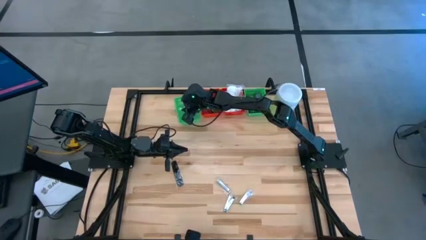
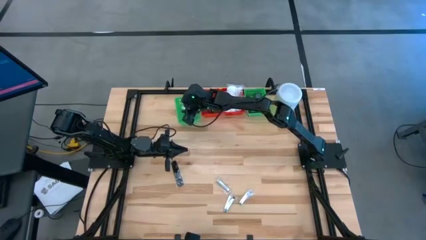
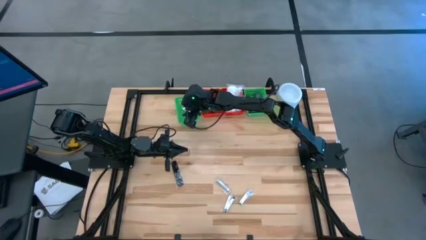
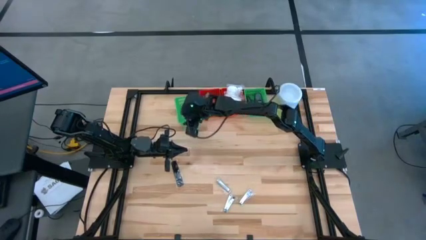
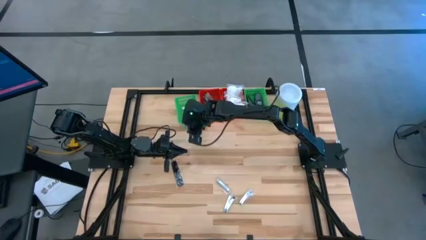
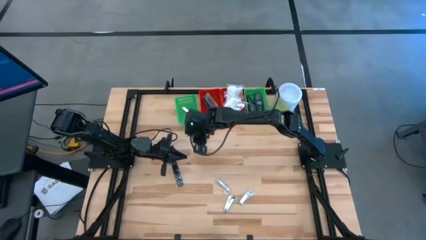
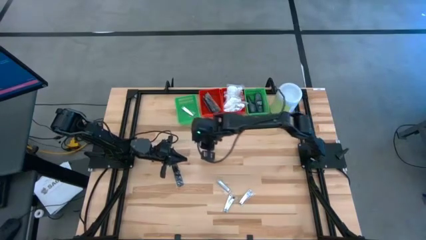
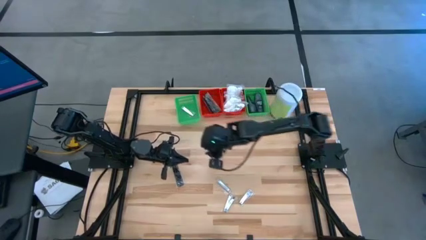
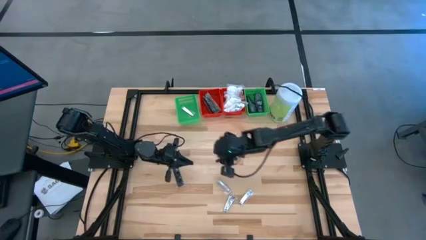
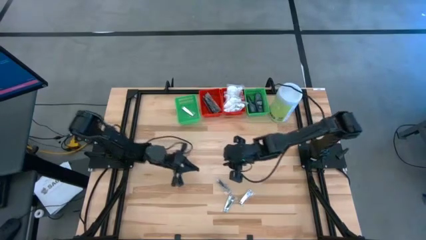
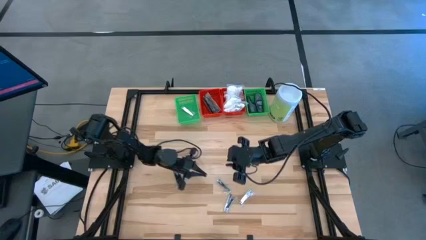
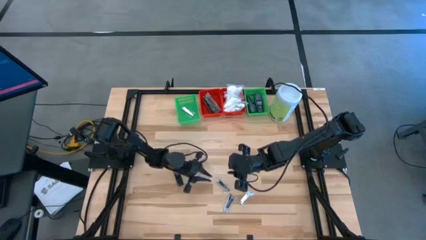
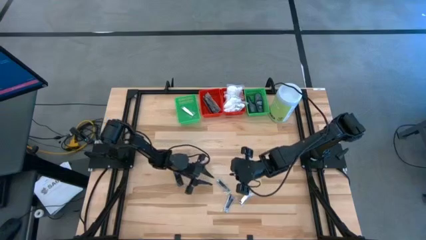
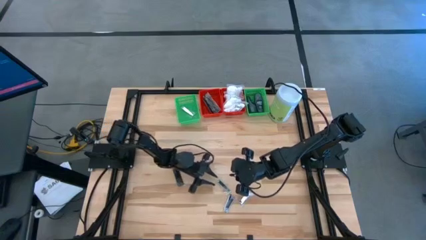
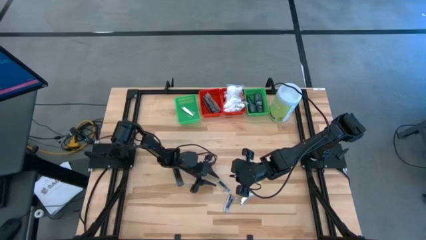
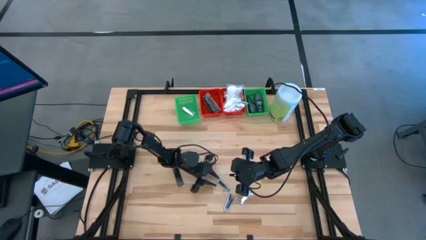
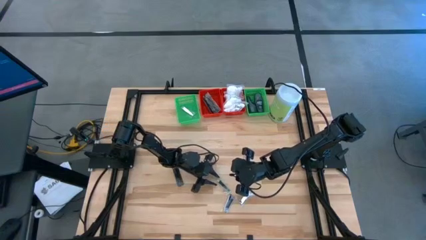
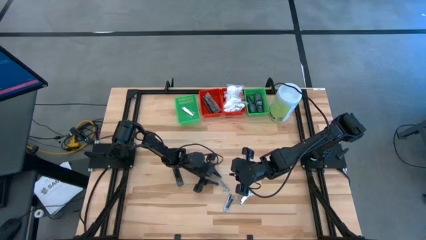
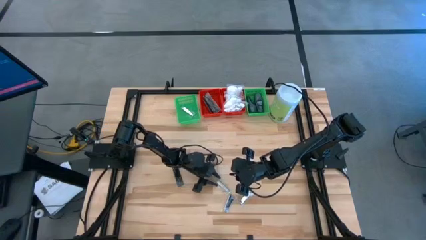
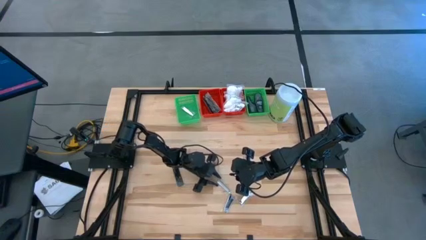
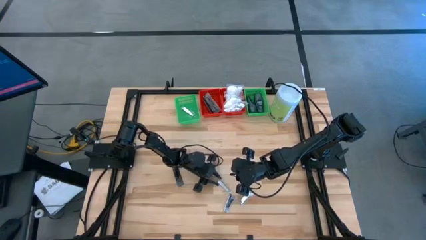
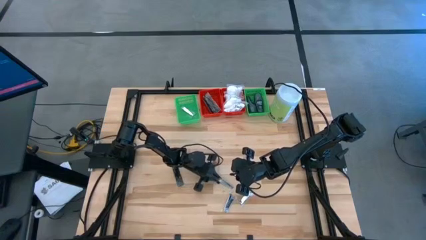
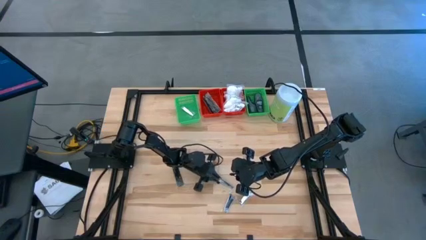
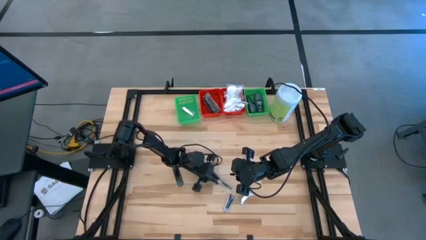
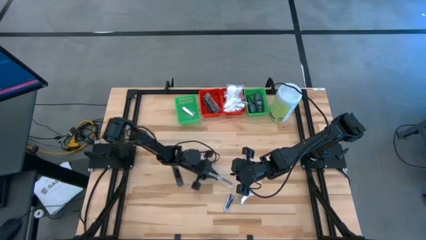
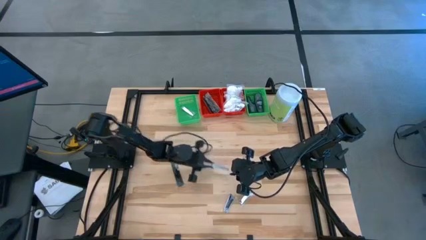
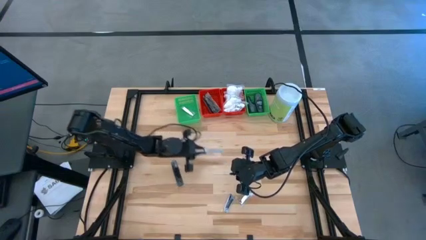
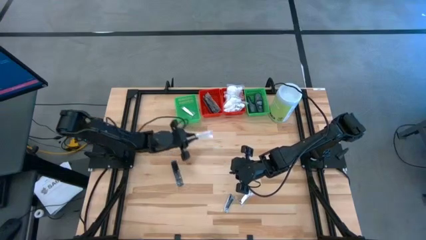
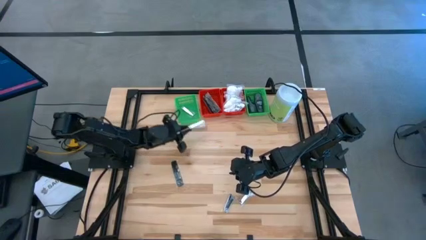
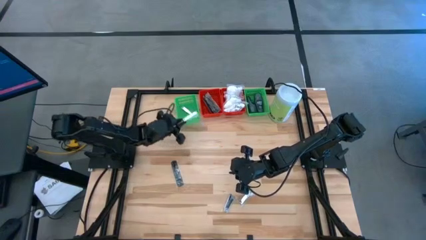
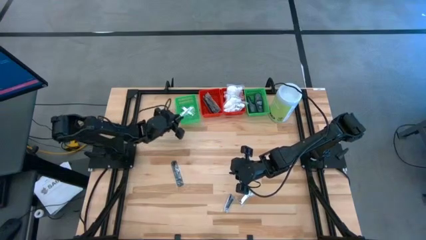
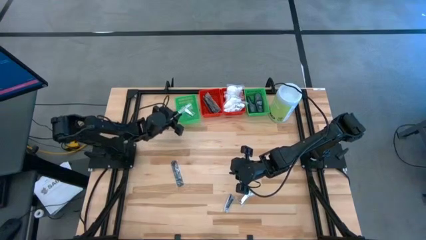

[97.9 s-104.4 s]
Task: Pick & Place Travel size toiletries
Put the silver nail cutter into the left green bin

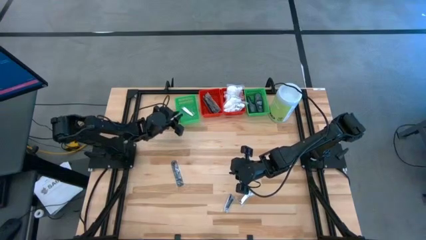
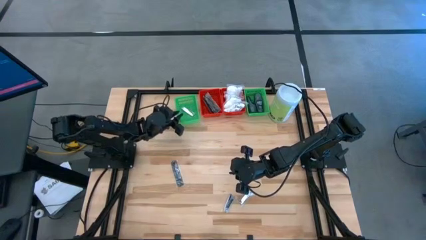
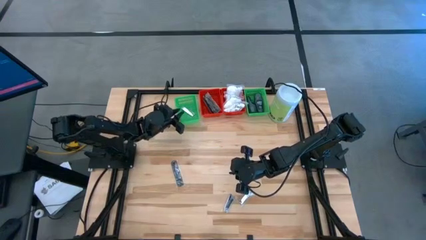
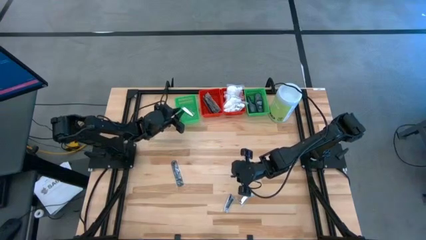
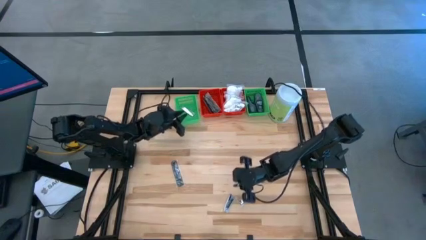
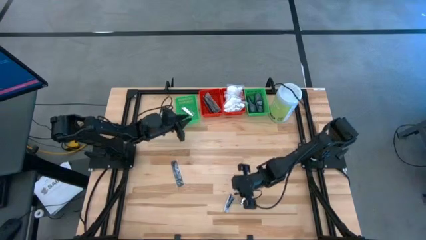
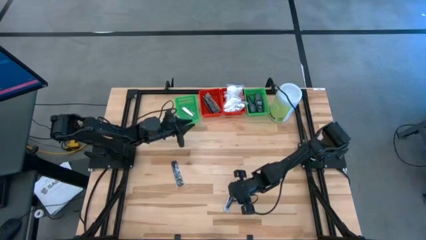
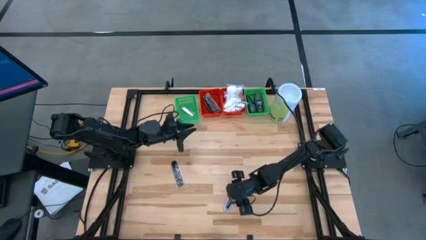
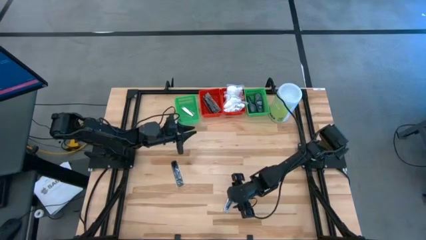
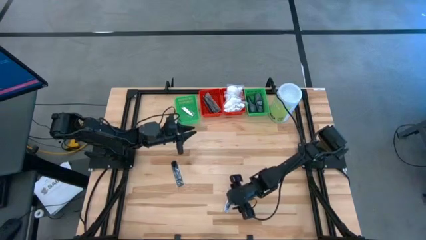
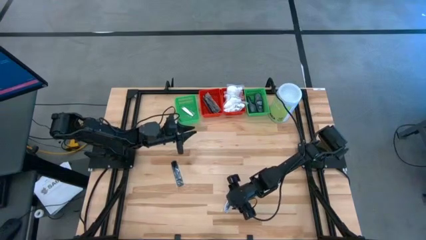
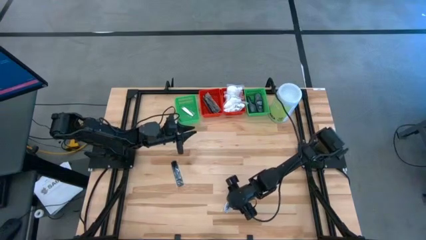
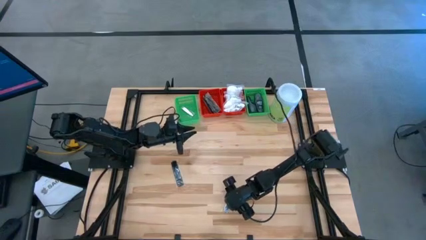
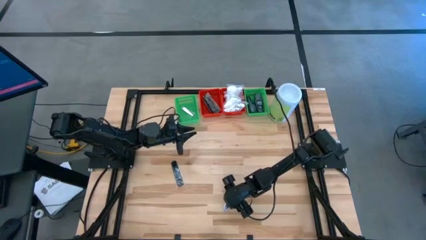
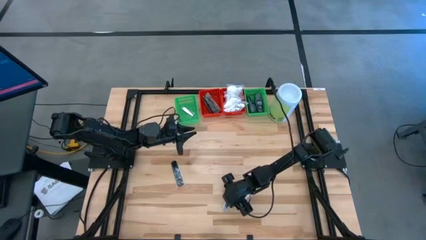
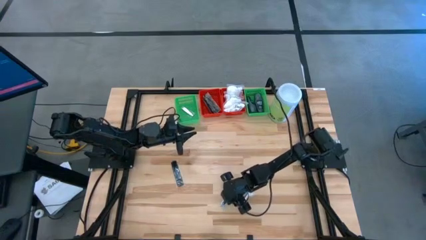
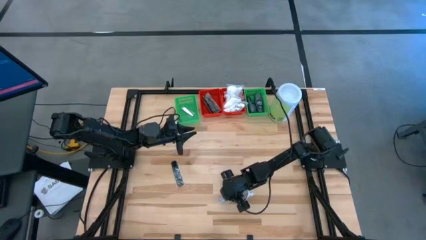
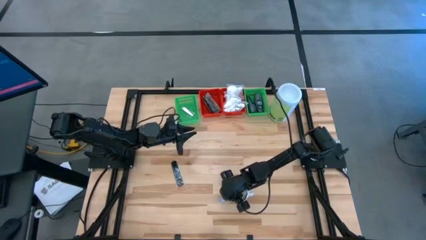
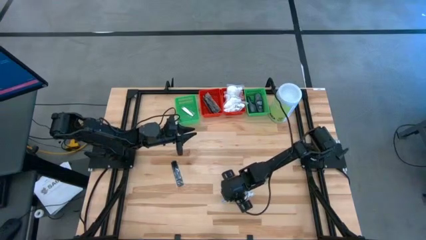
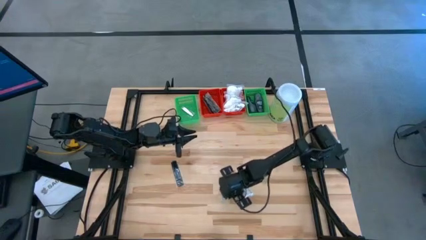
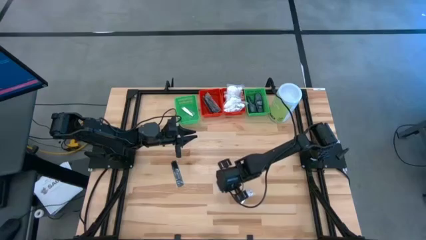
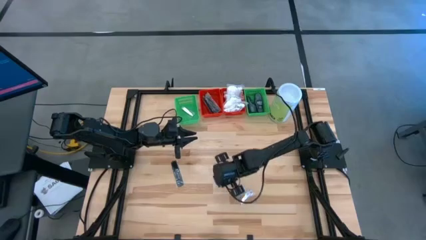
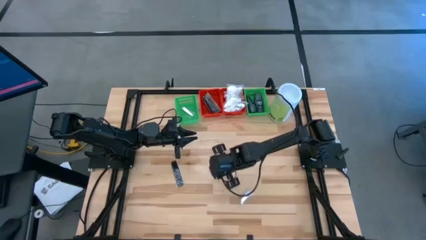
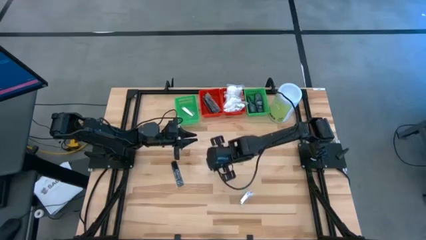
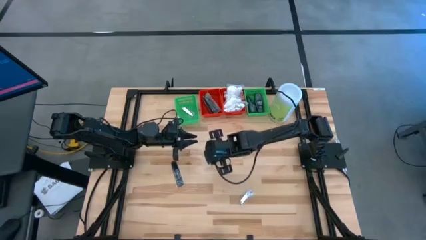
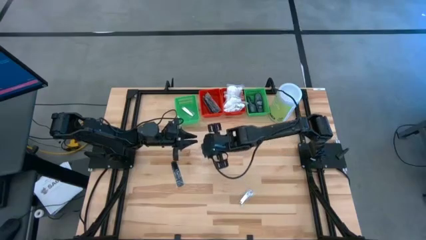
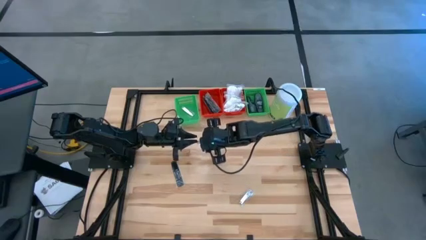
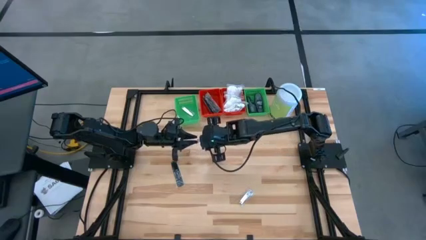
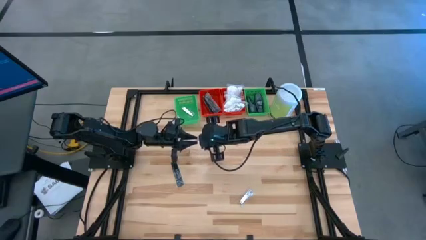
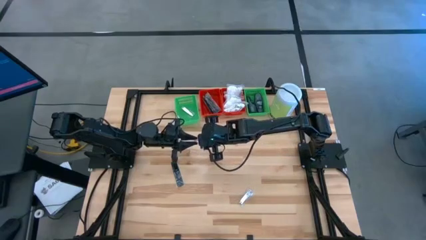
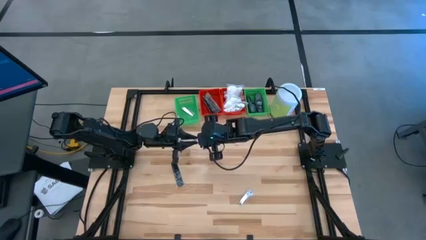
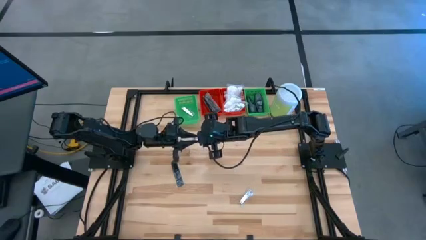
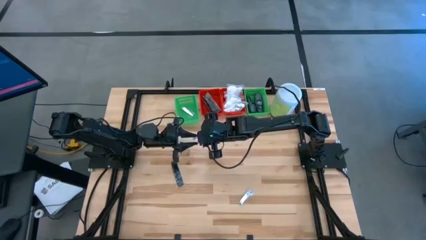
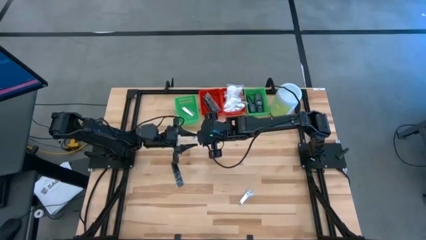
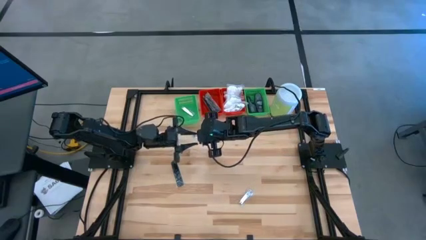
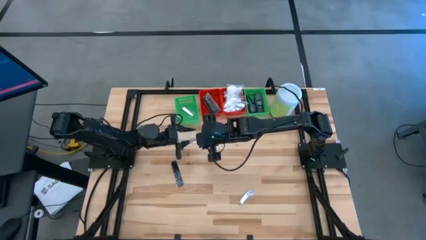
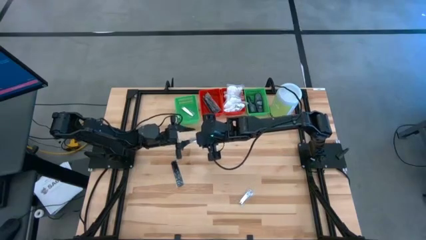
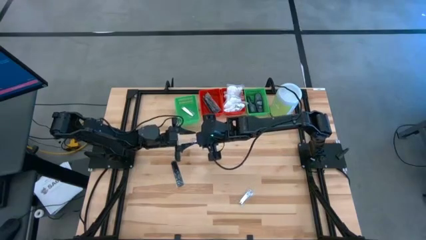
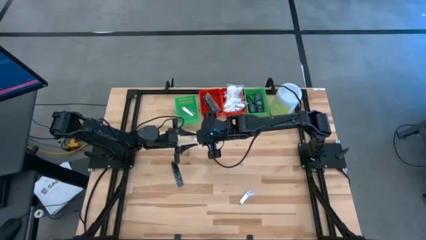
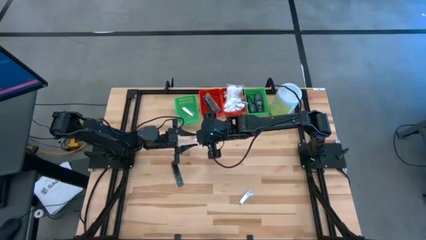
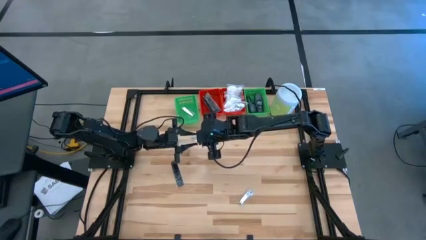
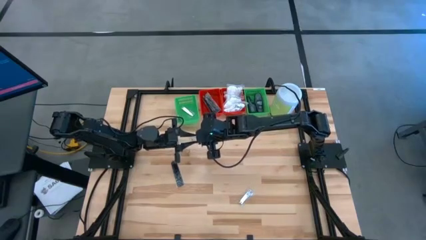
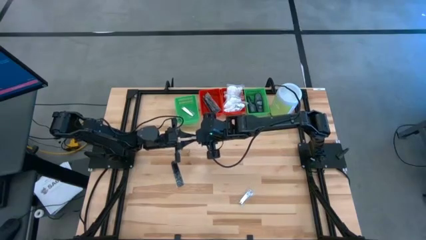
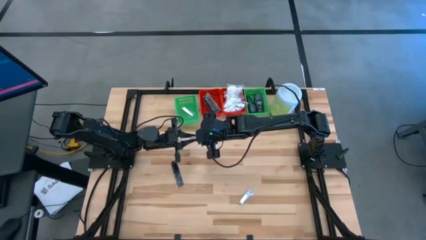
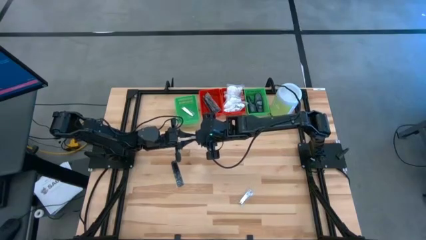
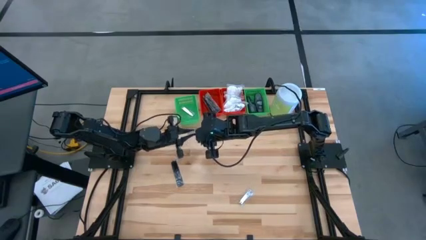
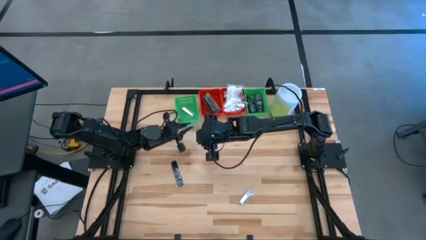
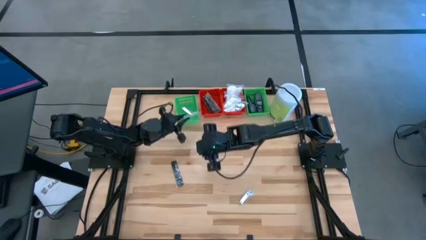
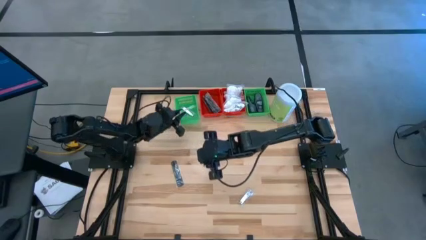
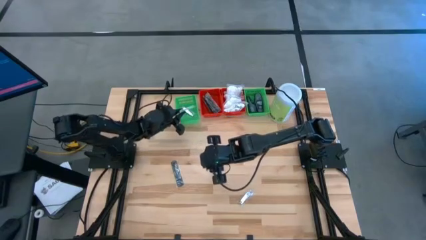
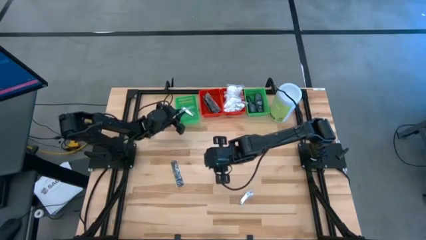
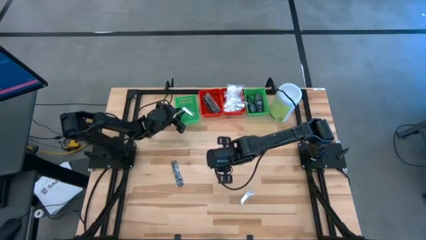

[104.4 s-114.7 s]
Put the silver nail cutter into the left green bin
